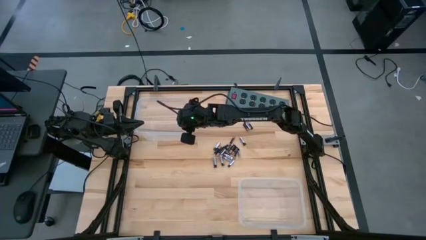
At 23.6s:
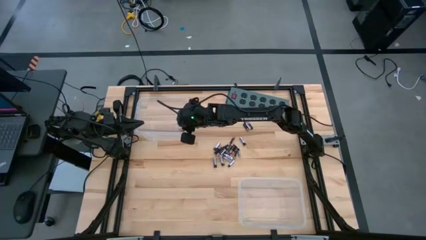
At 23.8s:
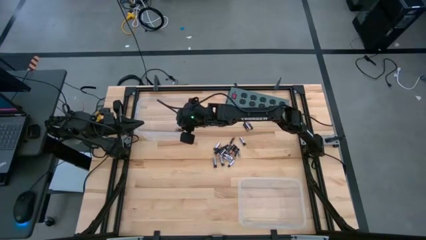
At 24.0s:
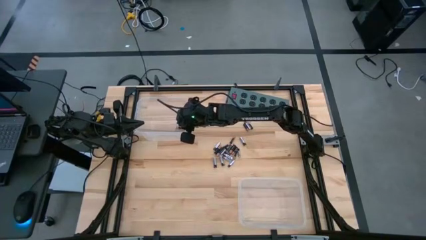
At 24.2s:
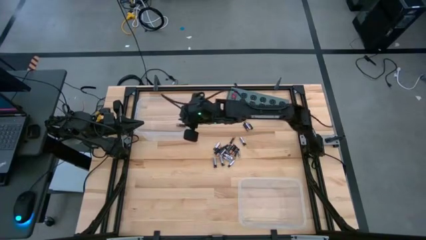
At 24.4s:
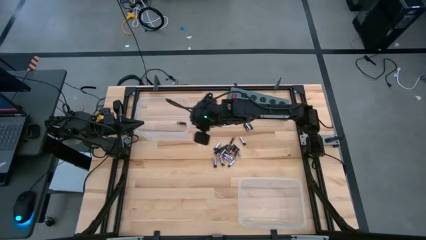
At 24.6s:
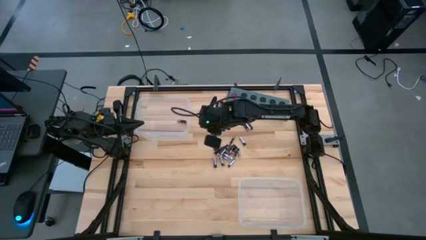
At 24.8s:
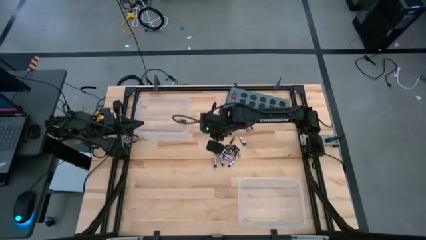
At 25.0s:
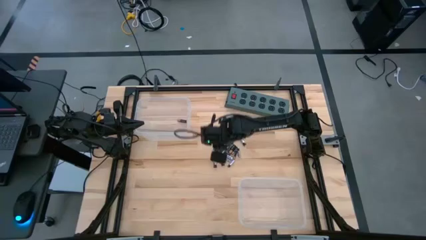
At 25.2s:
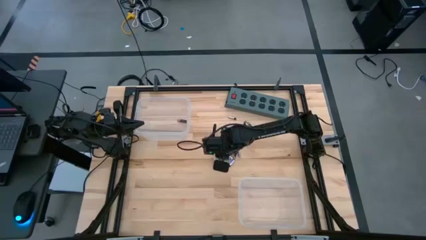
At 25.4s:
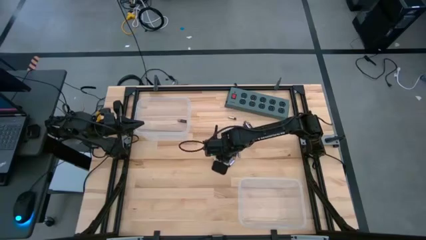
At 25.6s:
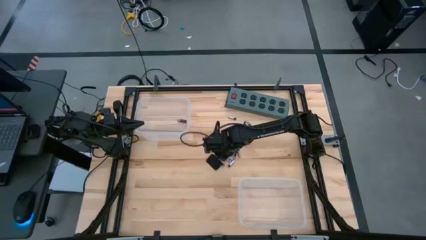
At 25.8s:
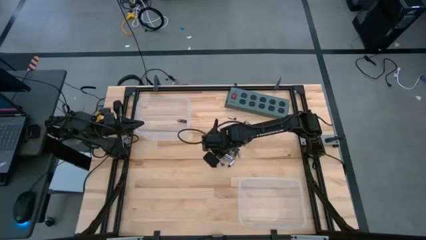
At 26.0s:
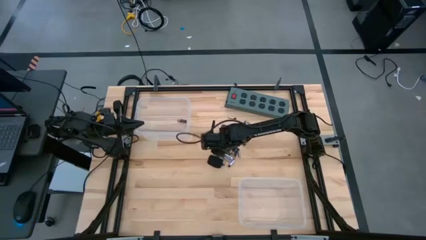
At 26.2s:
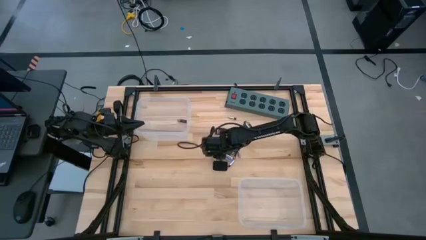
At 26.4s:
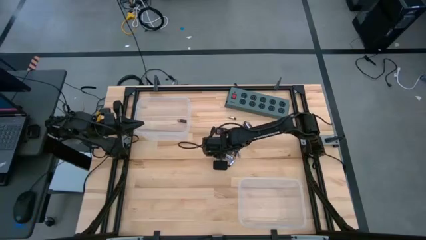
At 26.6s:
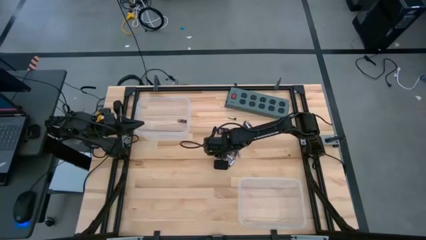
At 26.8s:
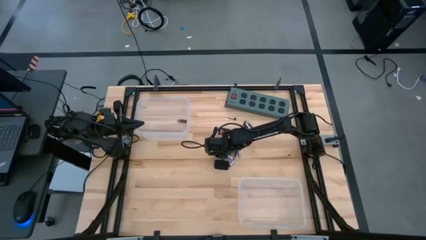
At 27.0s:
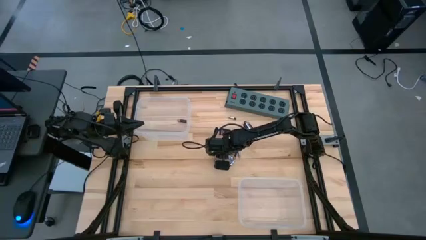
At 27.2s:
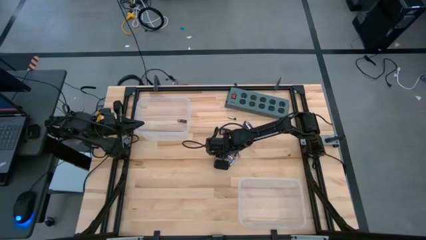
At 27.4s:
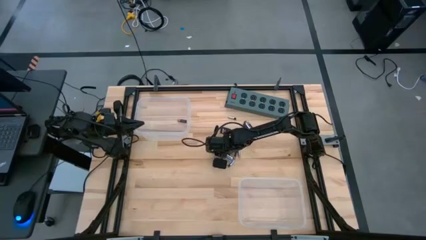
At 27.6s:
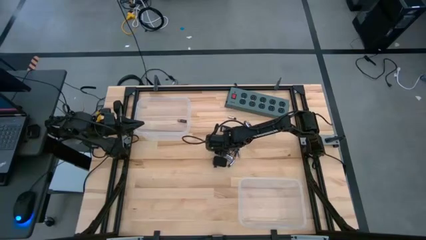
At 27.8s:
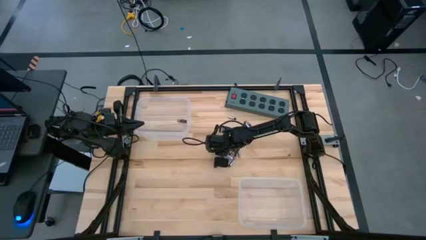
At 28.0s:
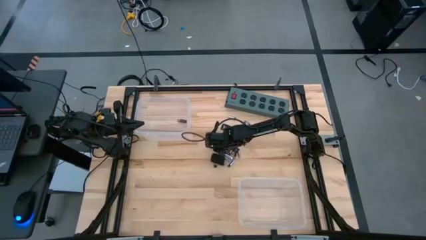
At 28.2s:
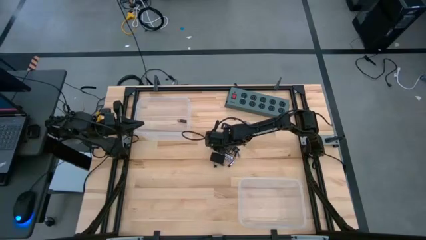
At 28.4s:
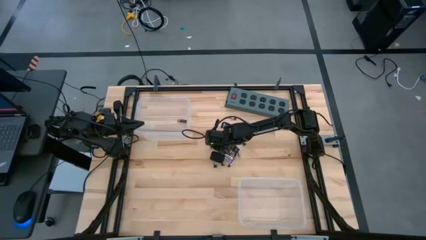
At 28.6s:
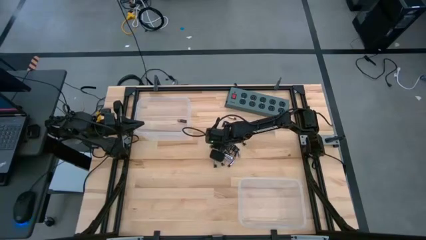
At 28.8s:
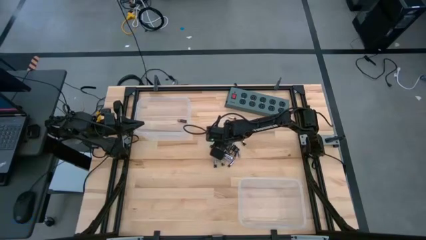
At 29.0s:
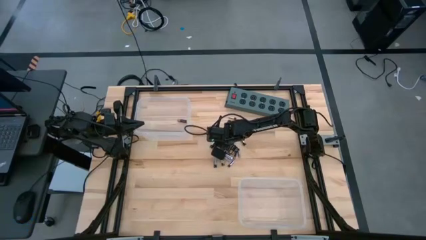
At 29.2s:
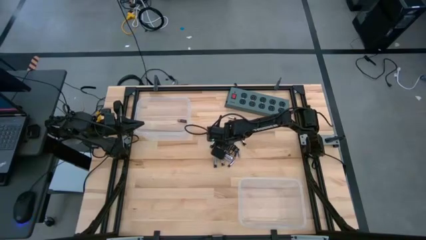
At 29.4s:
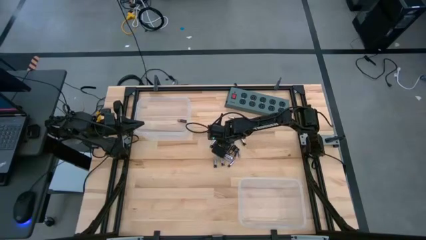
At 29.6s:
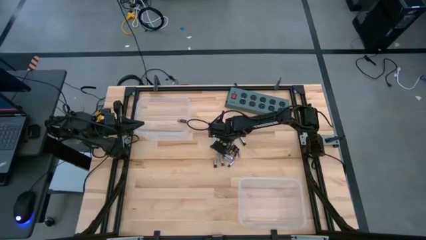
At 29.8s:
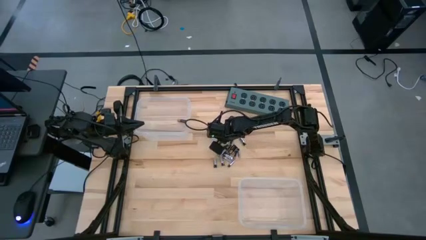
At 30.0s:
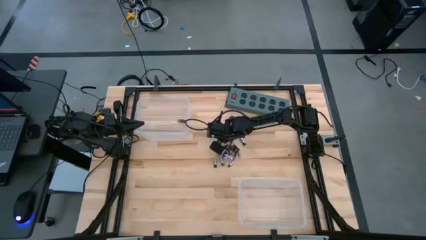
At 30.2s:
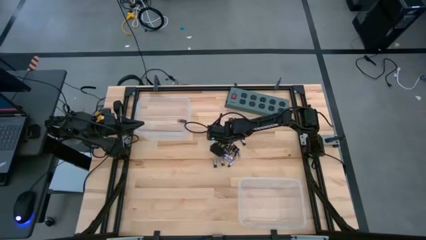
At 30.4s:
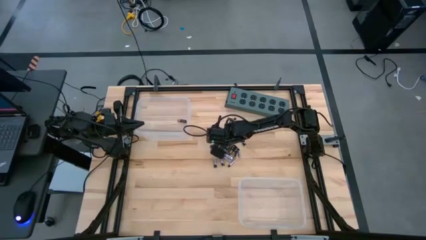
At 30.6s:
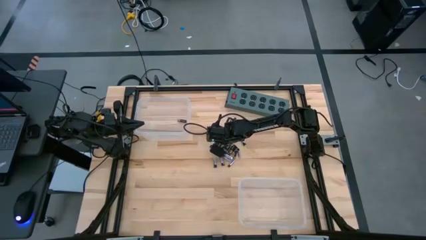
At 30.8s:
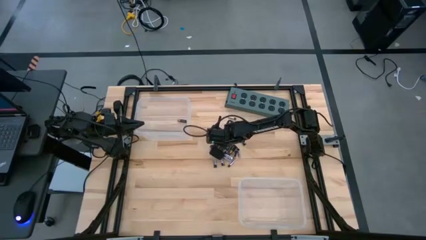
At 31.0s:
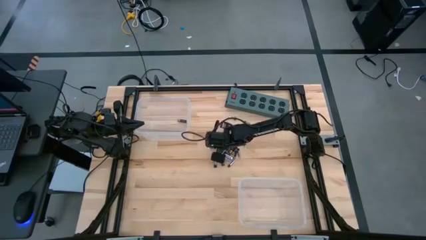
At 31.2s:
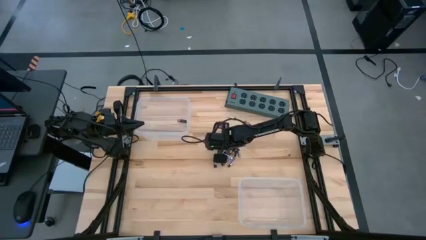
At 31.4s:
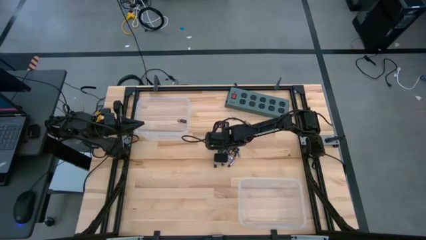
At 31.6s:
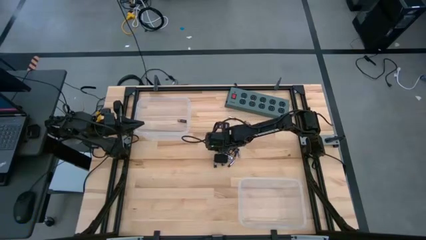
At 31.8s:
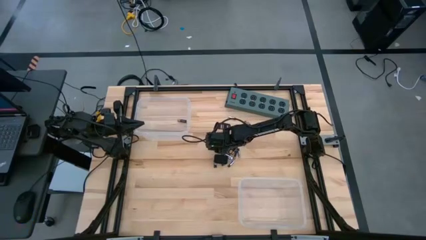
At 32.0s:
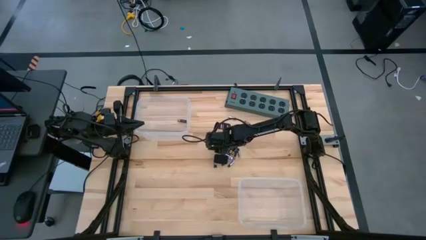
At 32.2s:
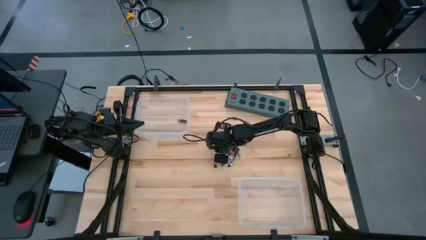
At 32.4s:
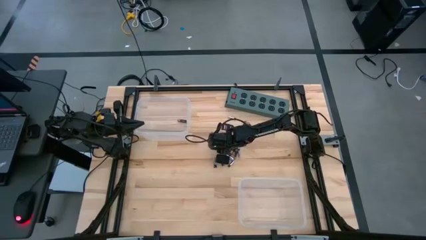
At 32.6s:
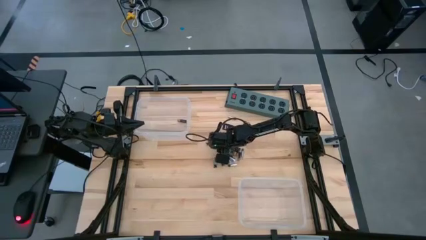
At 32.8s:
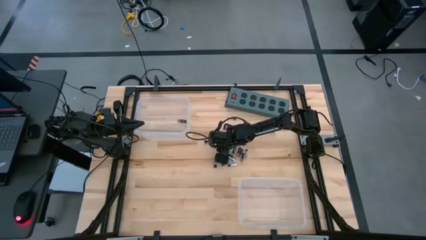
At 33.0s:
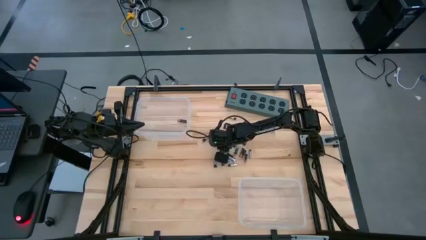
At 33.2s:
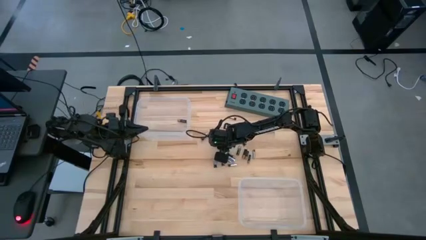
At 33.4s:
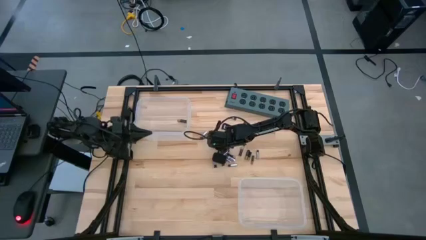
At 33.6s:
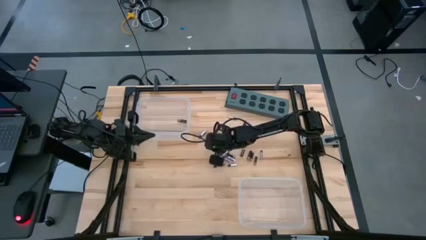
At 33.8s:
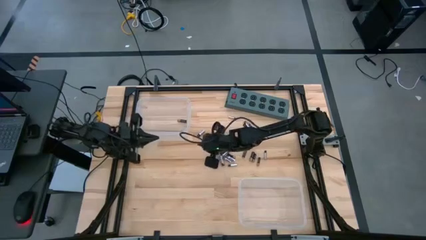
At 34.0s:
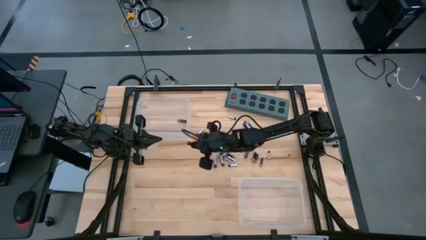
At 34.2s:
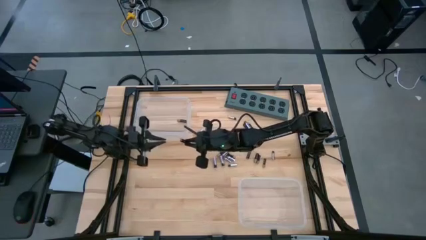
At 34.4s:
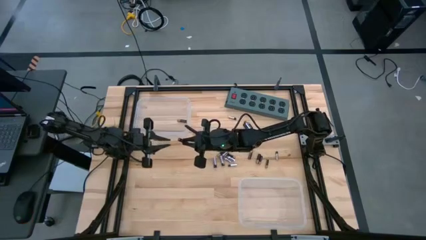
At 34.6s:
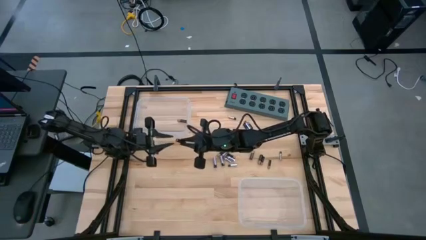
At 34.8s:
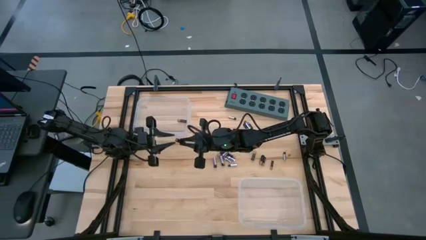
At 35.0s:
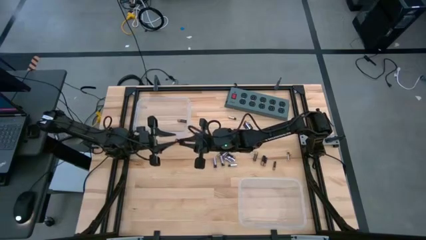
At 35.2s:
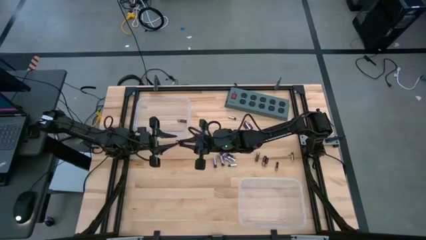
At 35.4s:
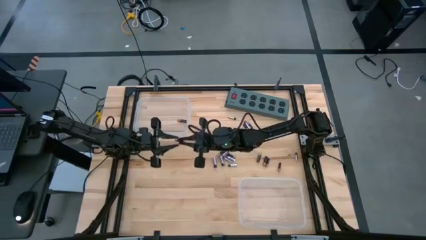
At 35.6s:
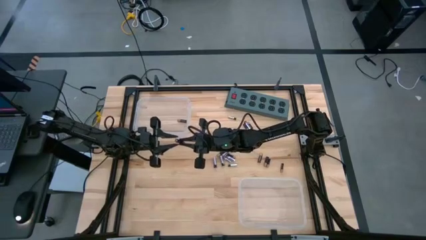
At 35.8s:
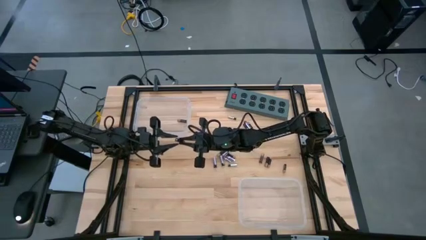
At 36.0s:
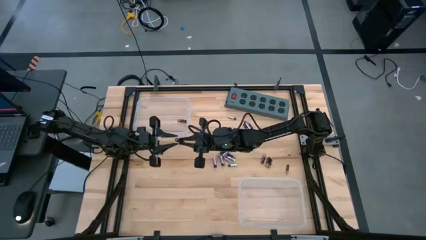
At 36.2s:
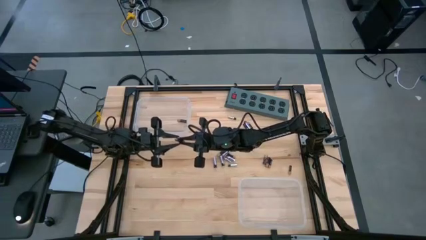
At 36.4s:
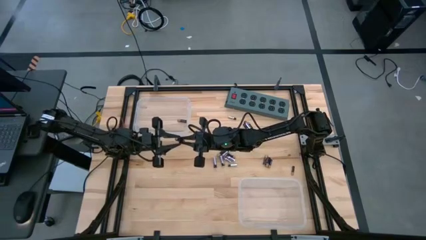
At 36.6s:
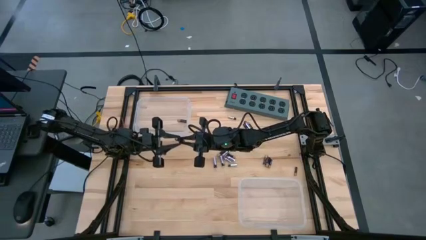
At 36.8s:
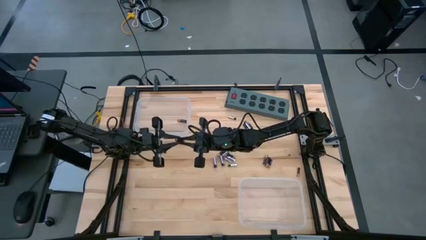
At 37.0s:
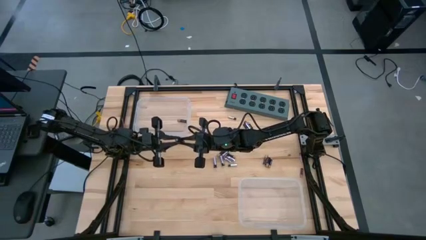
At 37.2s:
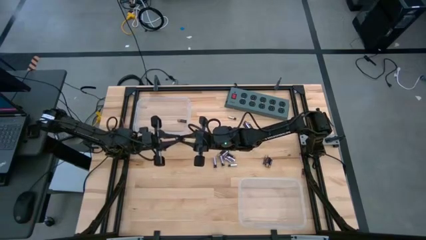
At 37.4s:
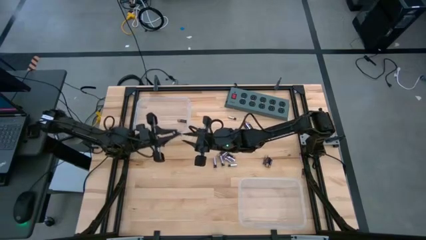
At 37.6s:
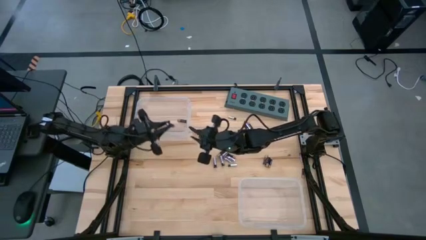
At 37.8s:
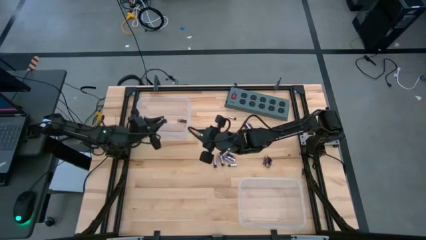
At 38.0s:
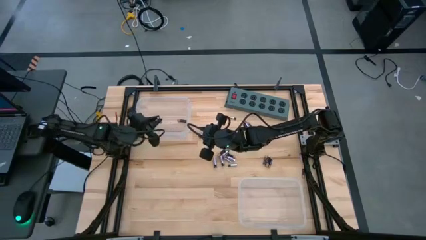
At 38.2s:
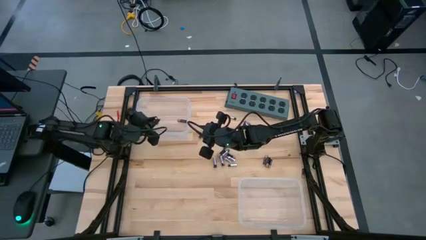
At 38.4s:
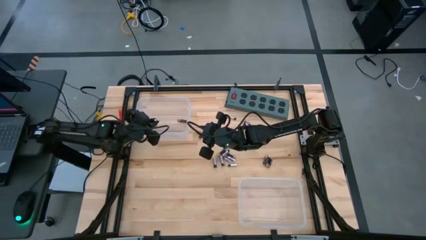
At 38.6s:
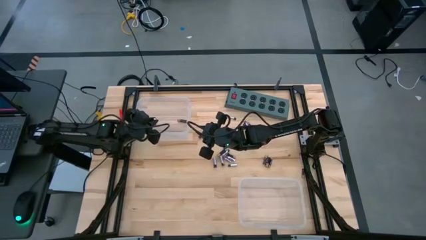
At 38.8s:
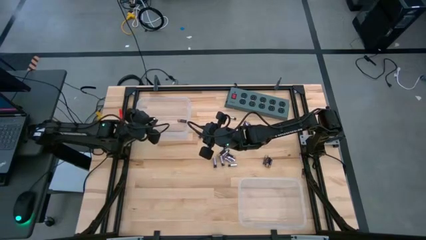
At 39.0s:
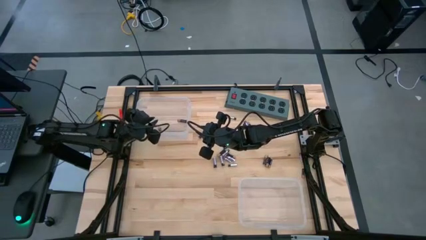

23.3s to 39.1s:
Task: Sort batteries
Put the black battery into the top transparent bin
